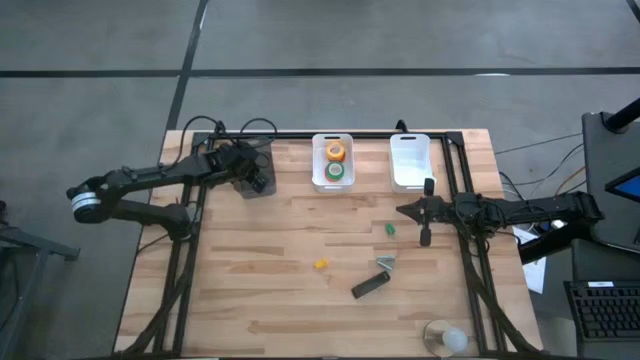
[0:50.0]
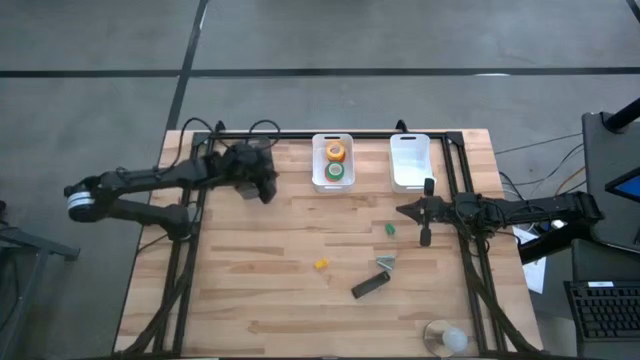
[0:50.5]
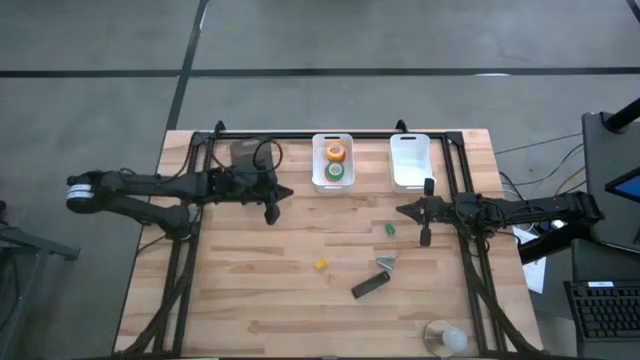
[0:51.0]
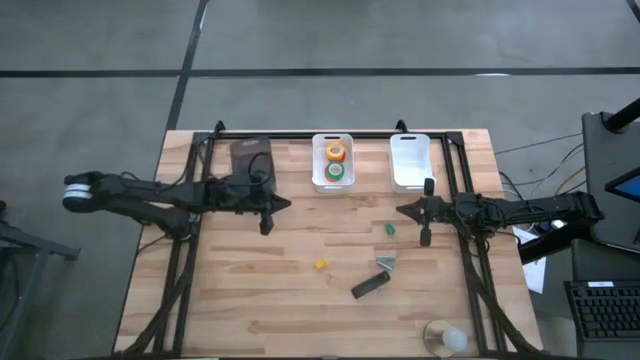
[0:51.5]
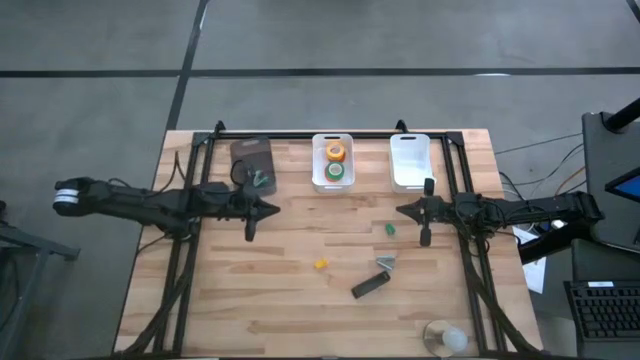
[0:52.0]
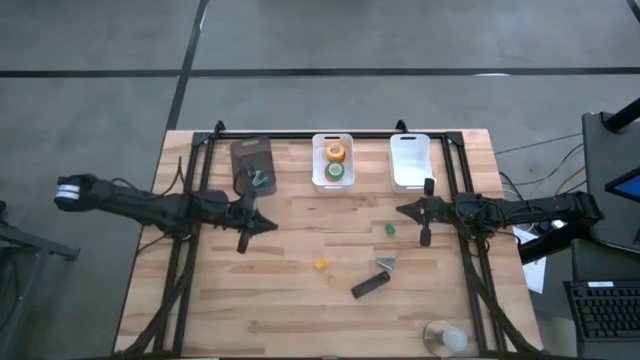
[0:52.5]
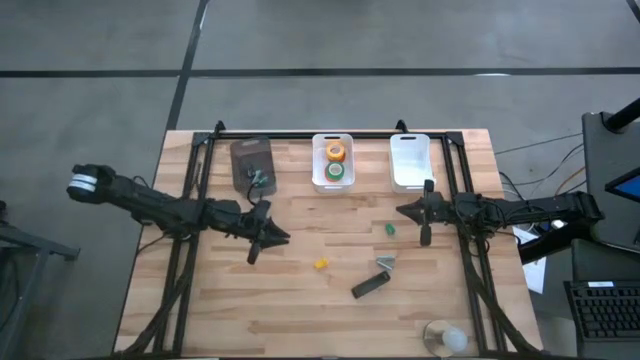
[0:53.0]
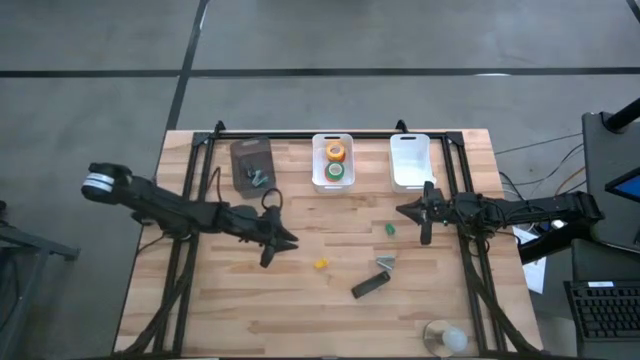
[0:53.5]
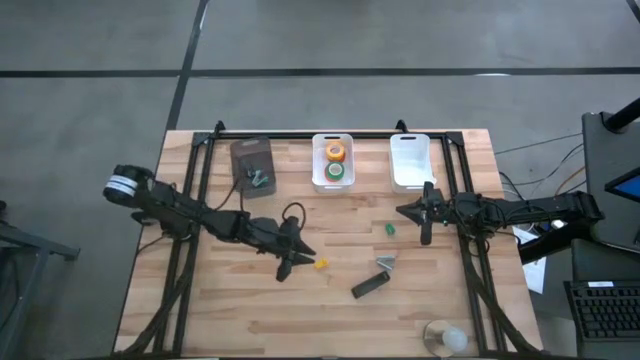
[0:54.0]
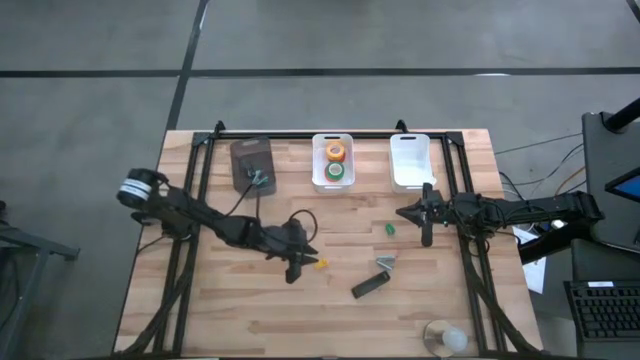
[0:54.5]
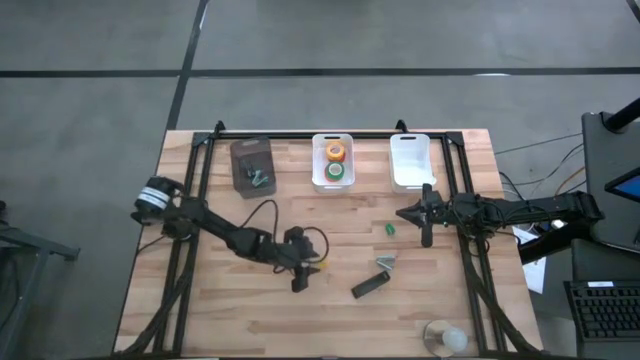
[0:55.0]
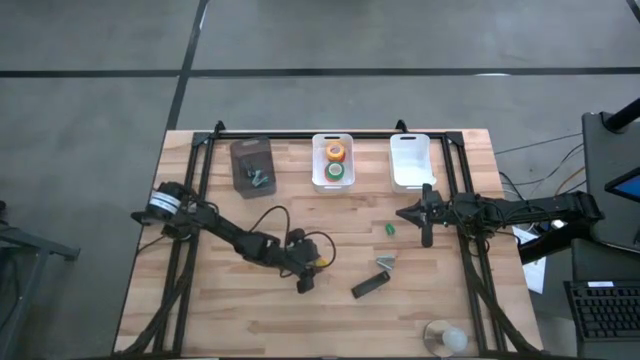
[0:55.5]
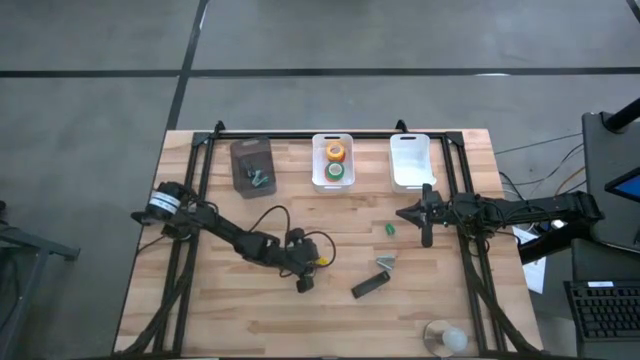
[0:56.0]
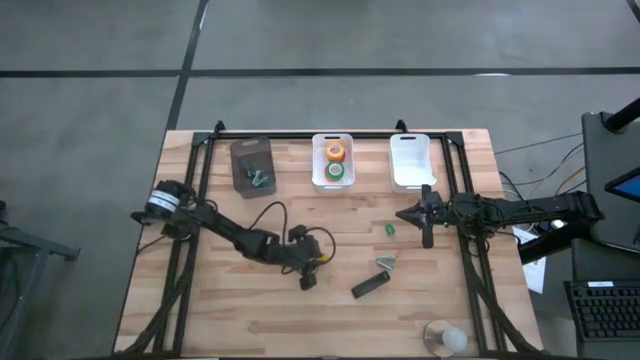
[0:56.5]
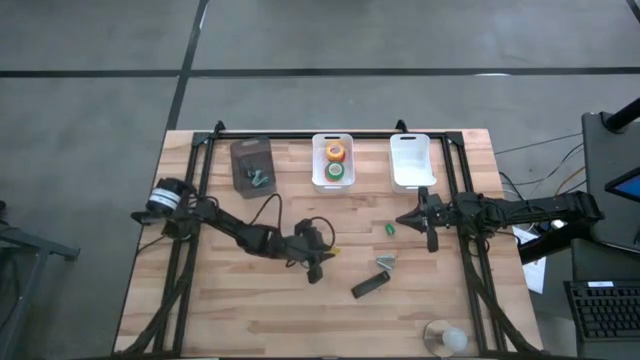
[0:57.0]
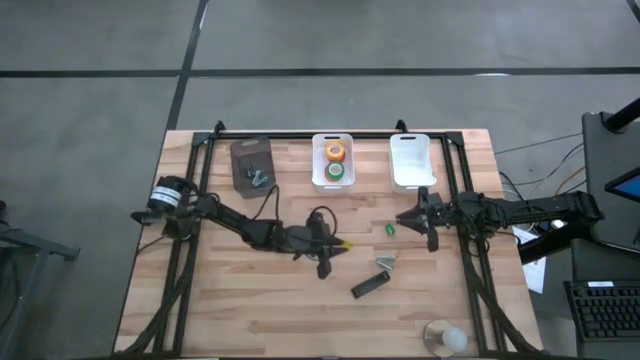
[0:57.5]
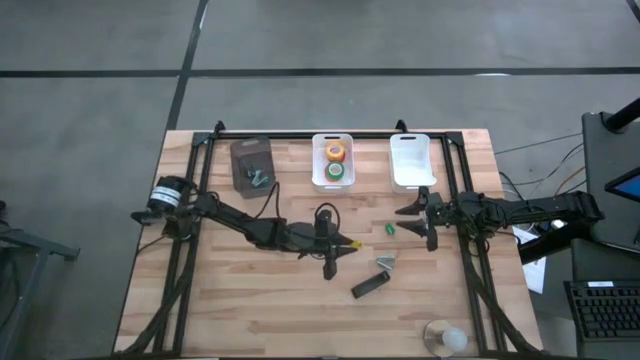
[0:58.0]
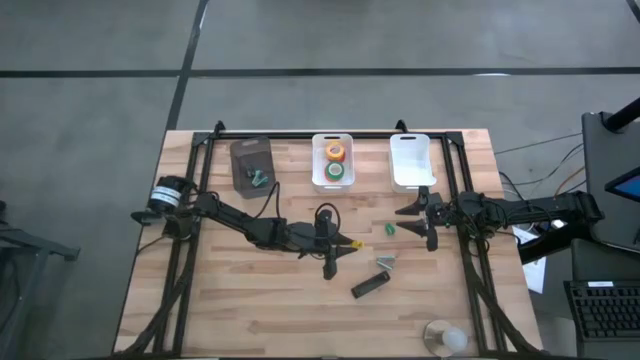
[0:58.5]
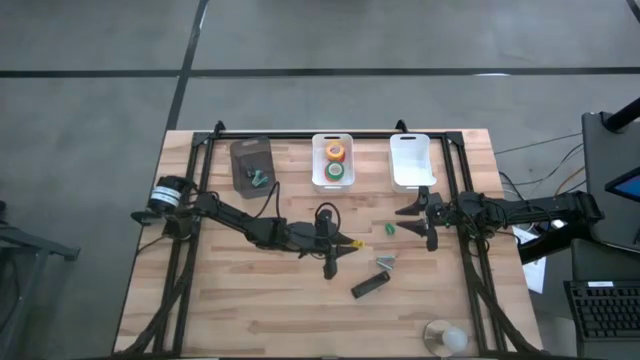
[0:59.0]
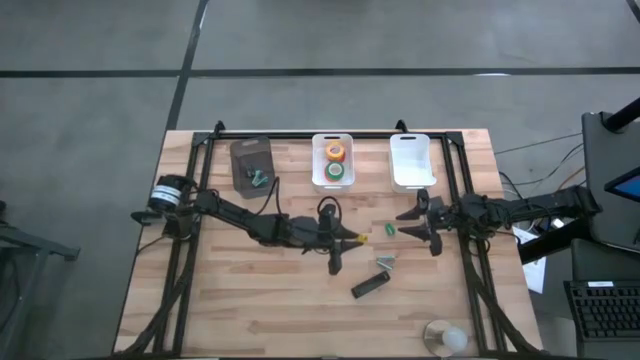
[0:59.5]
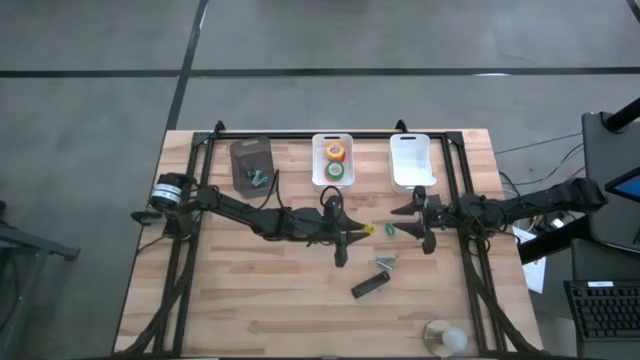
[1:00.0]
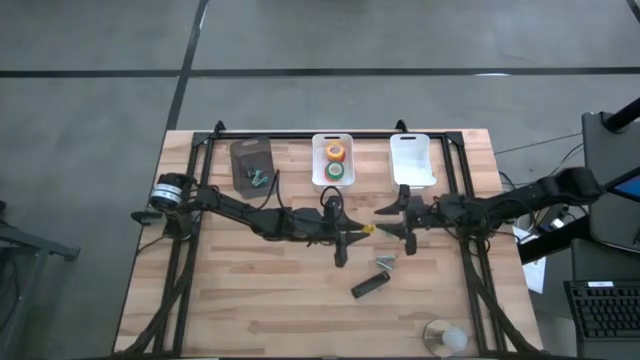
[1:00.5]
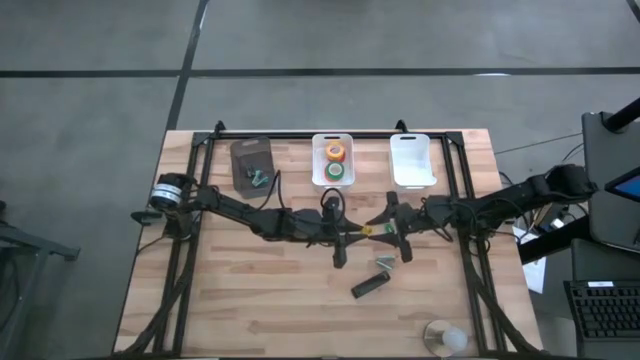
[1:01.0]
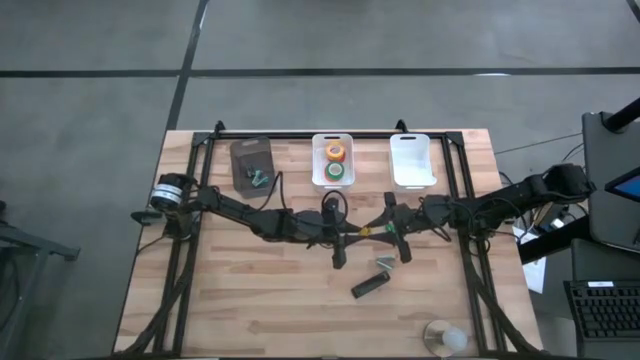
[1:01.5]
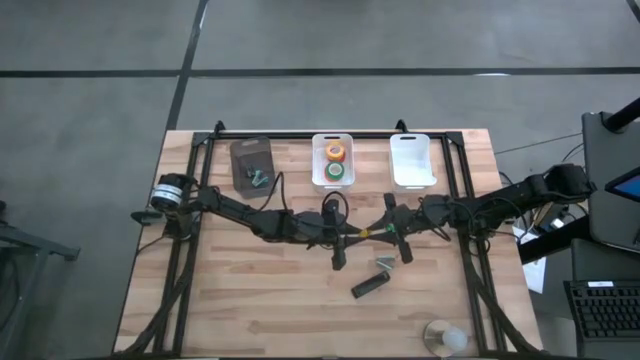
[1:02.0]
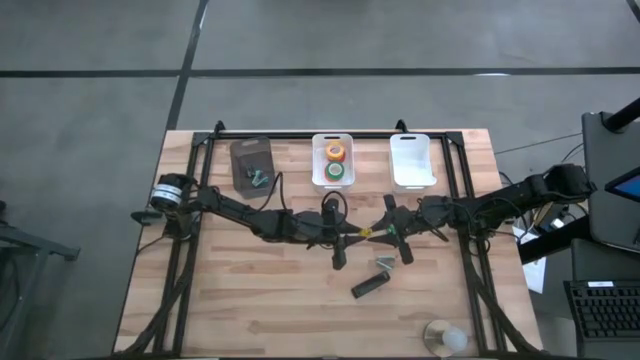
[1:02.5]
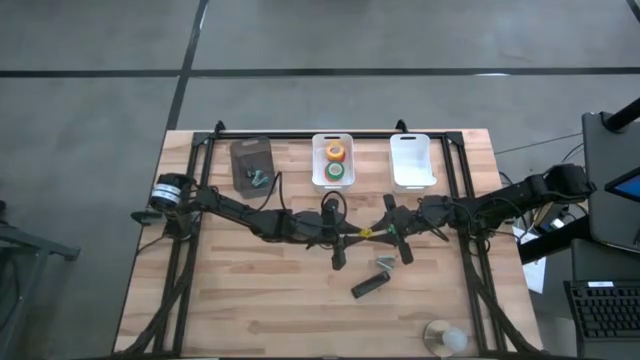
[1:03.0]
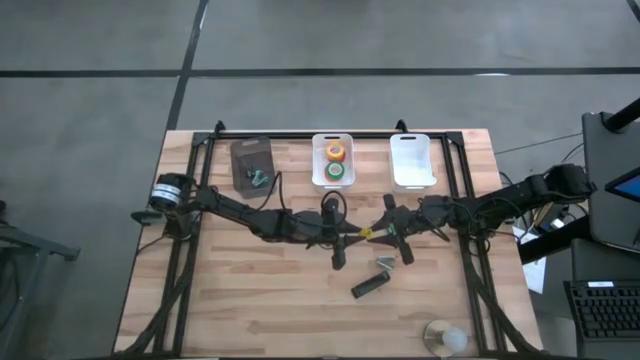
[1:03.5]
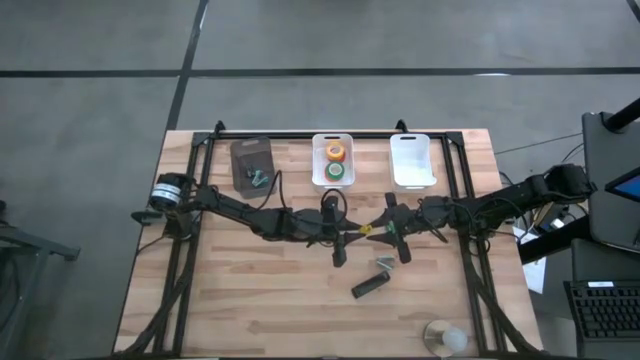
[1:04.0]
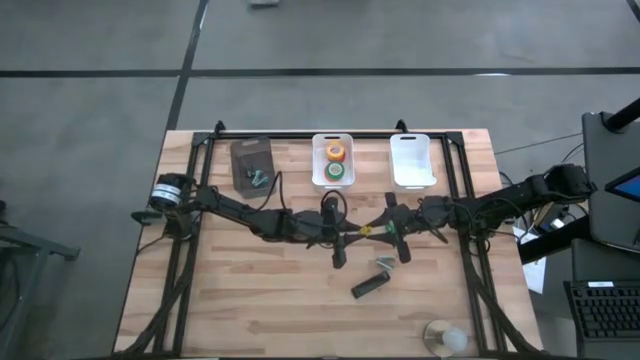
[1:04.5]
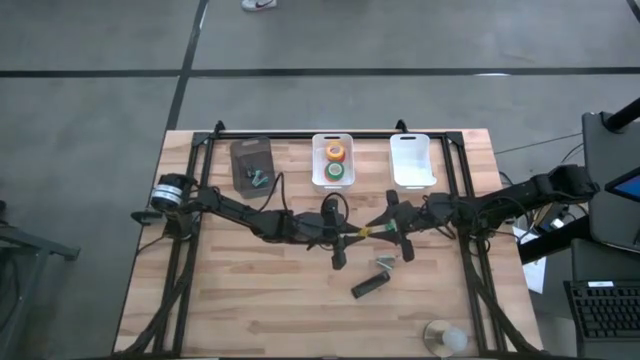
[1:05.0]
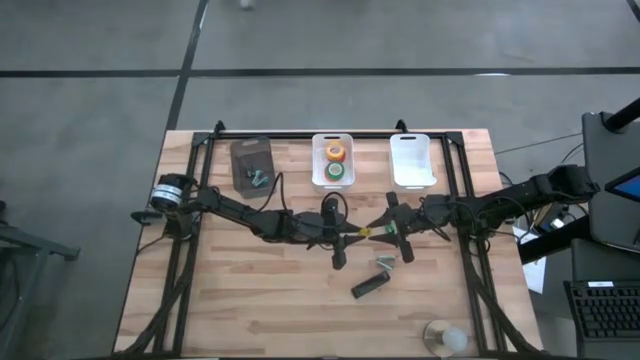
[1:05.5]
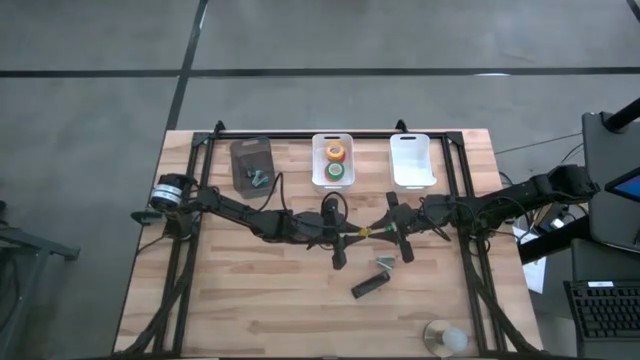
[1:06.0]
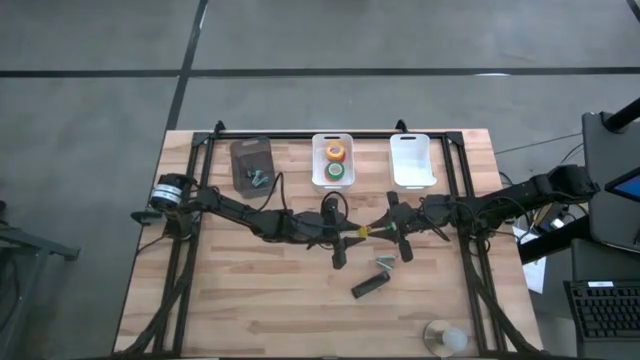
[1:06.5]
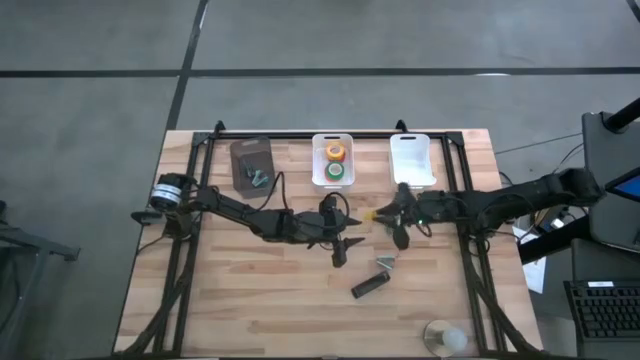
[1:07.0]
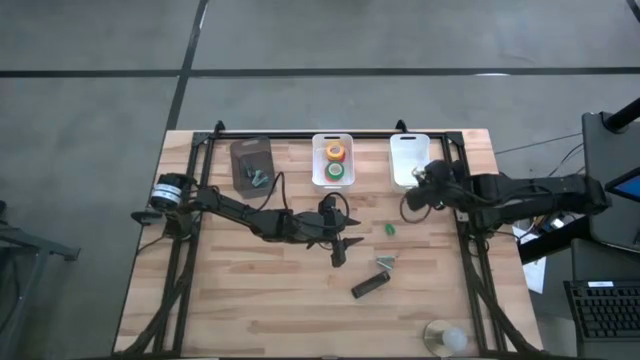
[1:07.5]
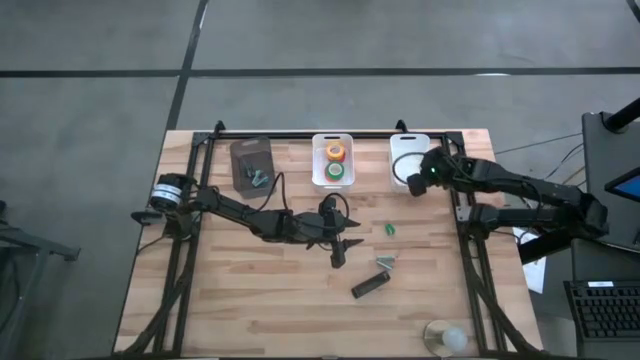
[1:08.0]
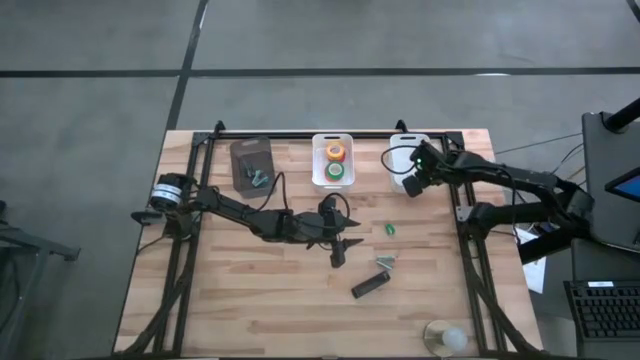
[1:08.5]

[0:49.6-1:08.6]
Task: Pick and place Stapler, Stapler remover, tape
Put the yellow stapler into the right white bin

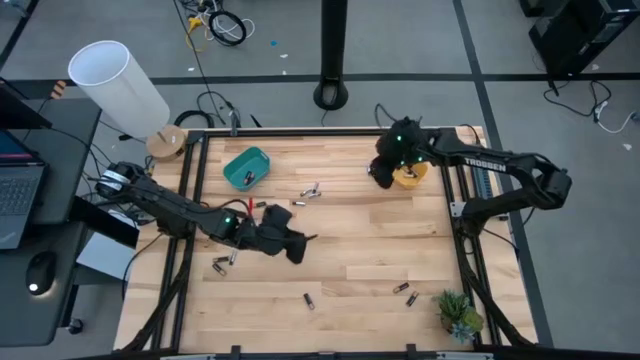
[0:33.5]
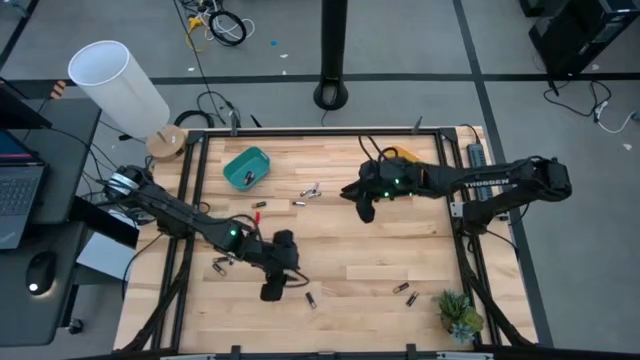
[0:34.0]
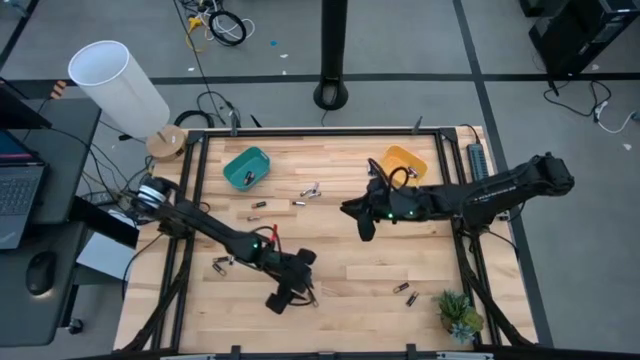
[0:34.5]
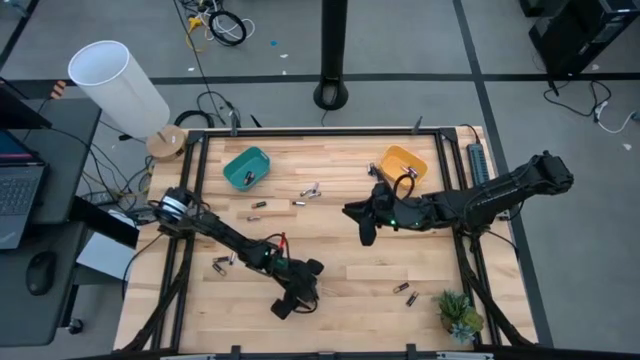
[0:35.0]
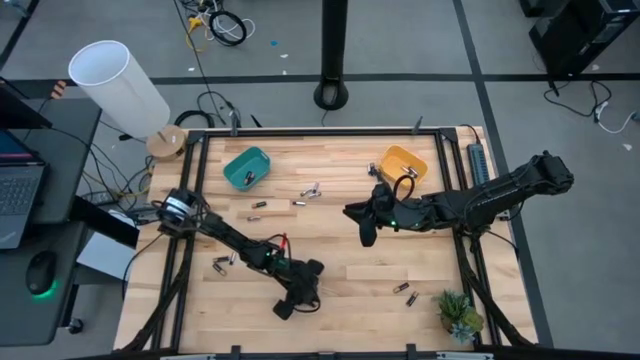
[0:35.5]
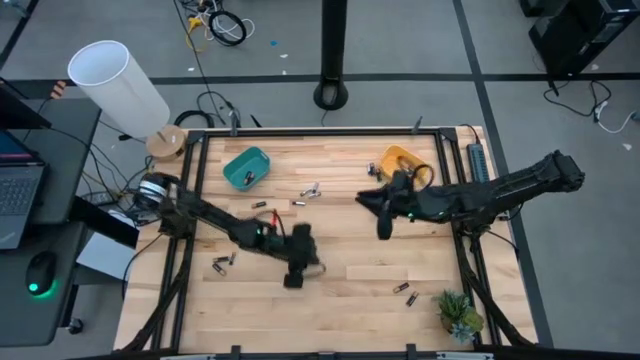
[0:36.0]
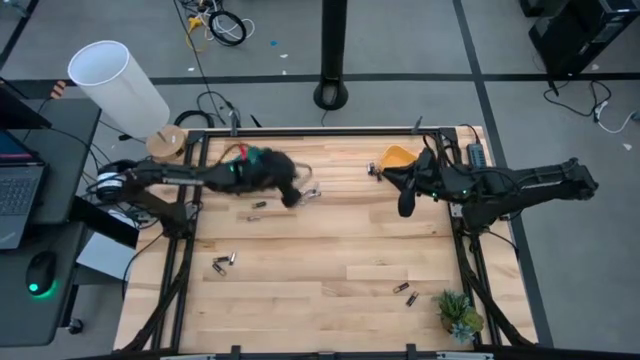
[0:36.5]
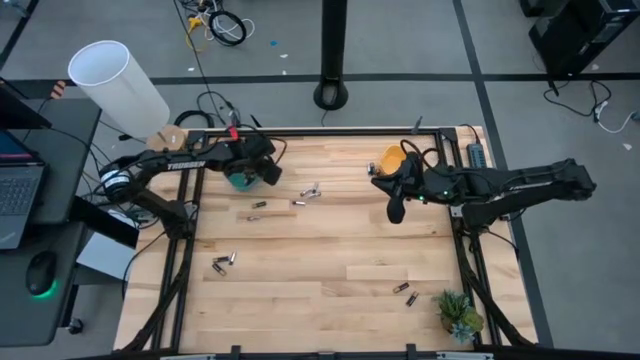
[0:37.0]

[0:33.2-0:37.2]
Task: Sort batteries
Put the black battery into the blue bin
